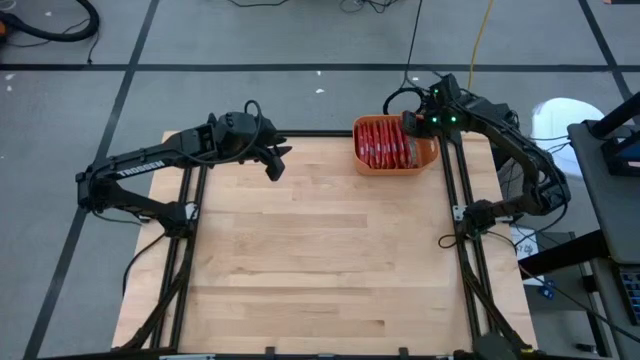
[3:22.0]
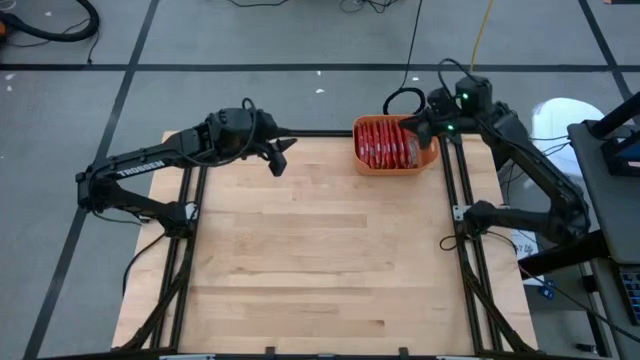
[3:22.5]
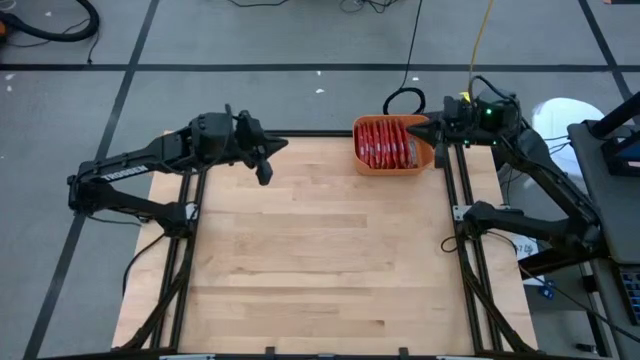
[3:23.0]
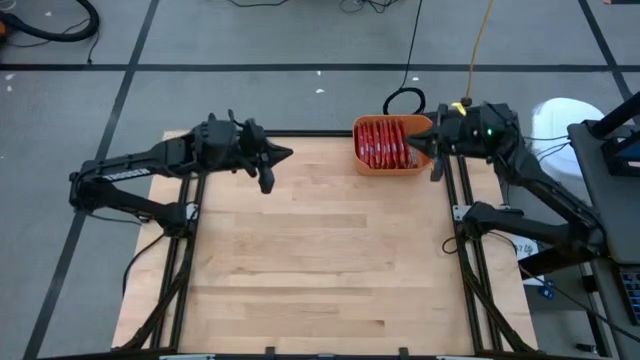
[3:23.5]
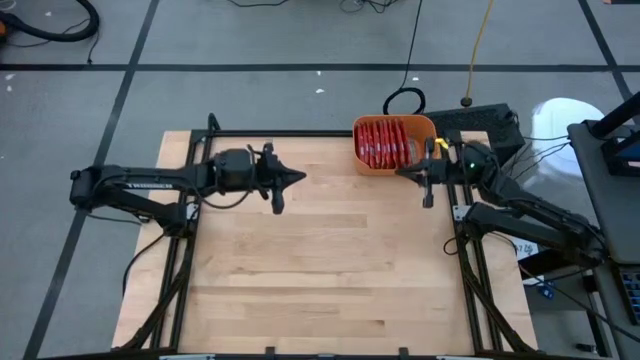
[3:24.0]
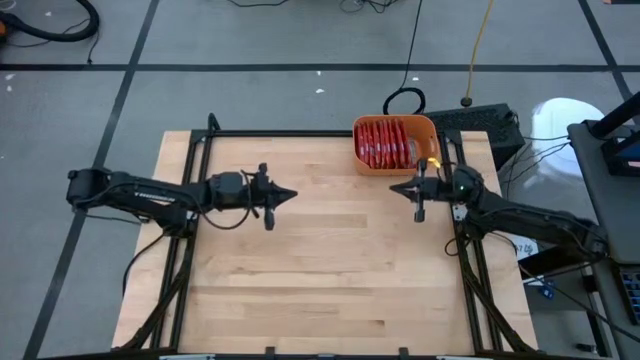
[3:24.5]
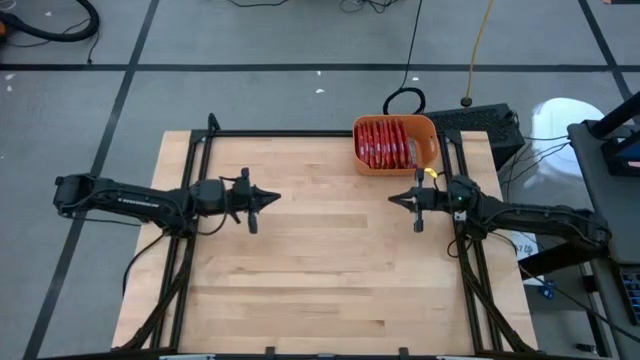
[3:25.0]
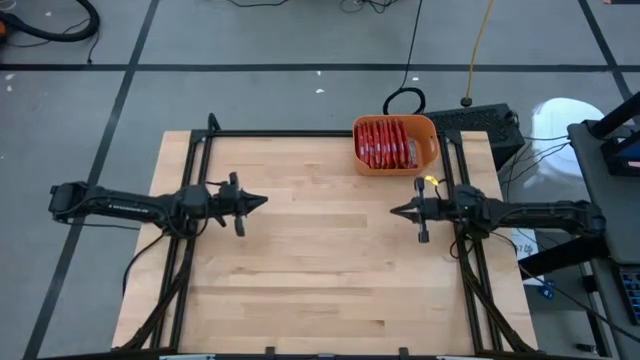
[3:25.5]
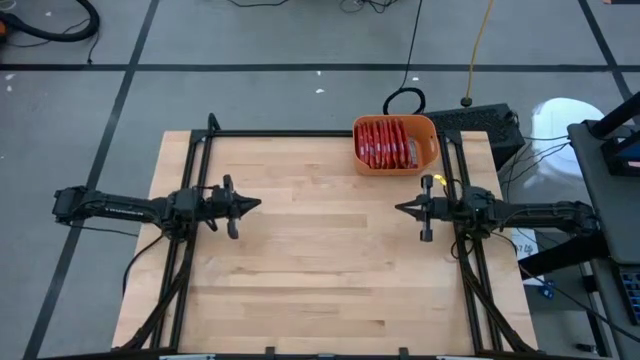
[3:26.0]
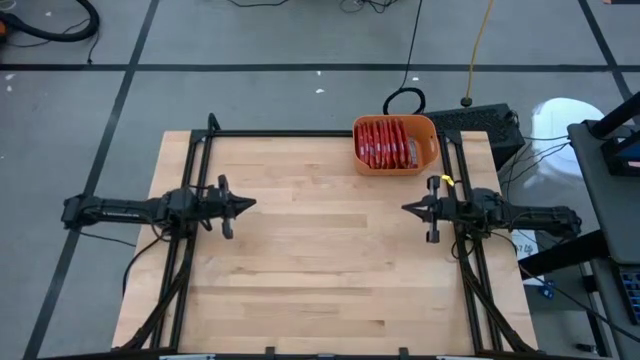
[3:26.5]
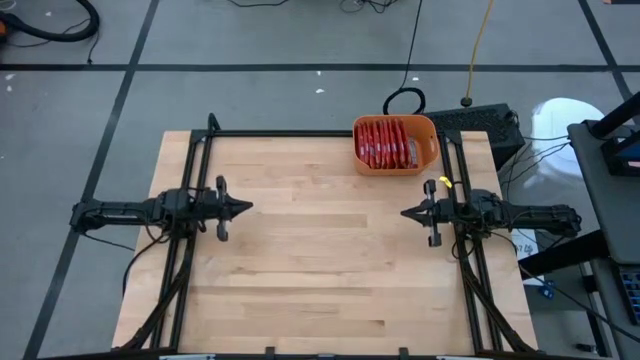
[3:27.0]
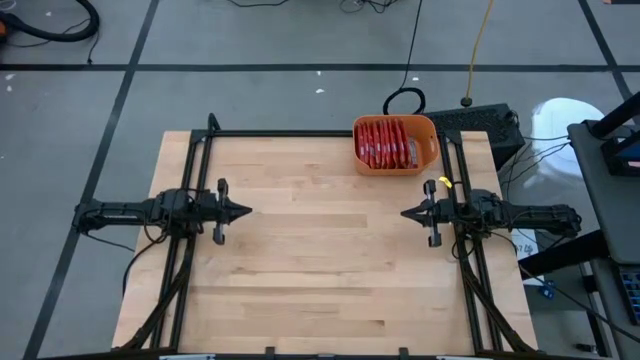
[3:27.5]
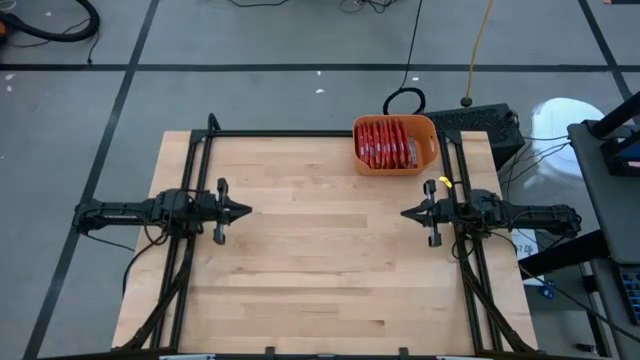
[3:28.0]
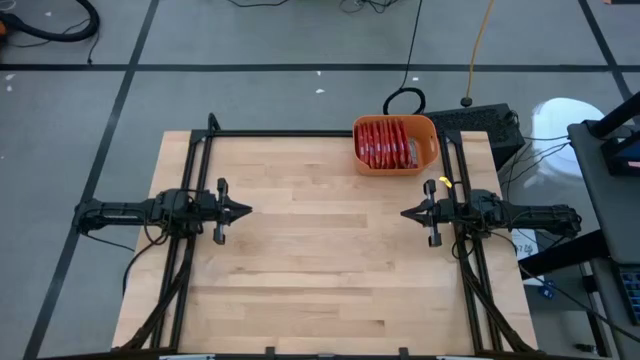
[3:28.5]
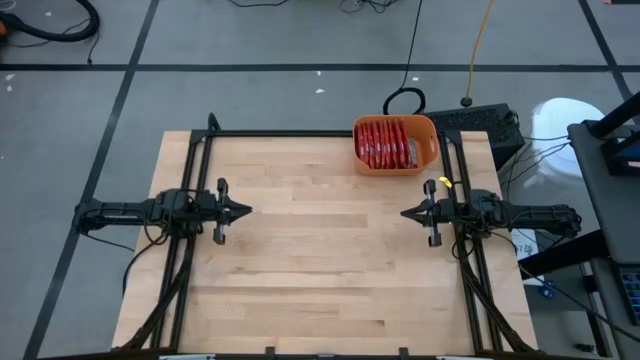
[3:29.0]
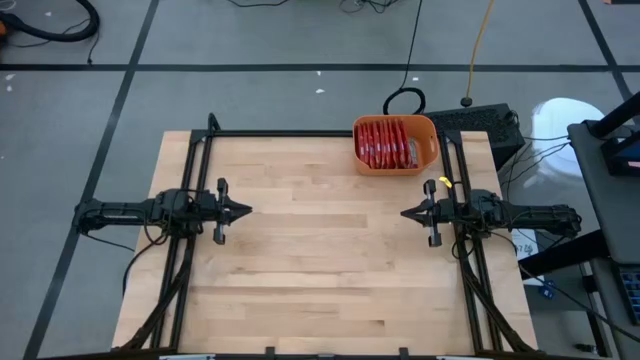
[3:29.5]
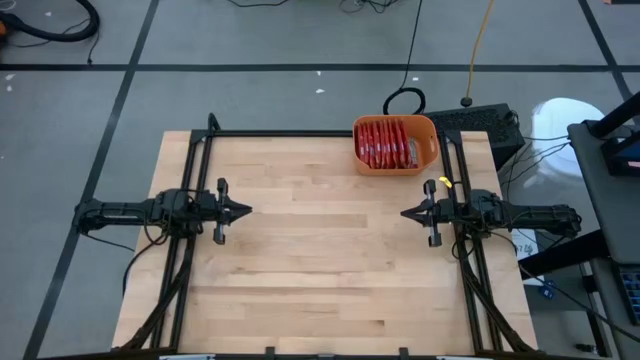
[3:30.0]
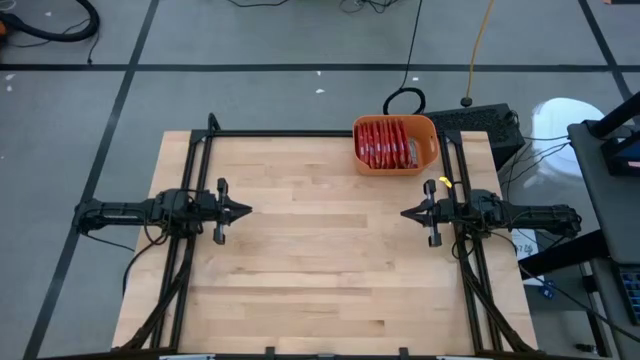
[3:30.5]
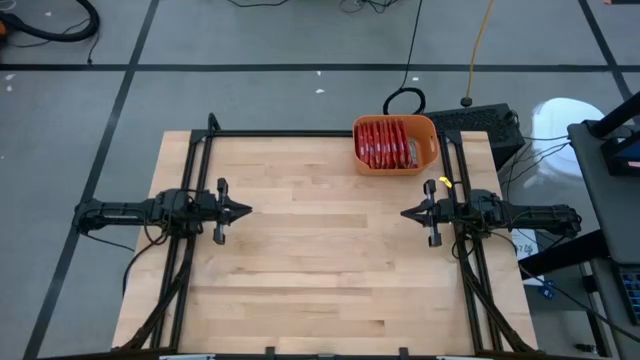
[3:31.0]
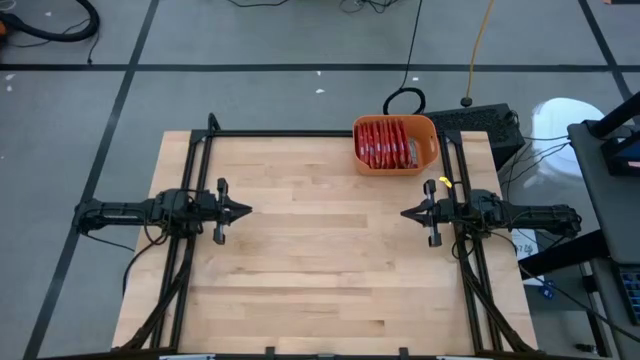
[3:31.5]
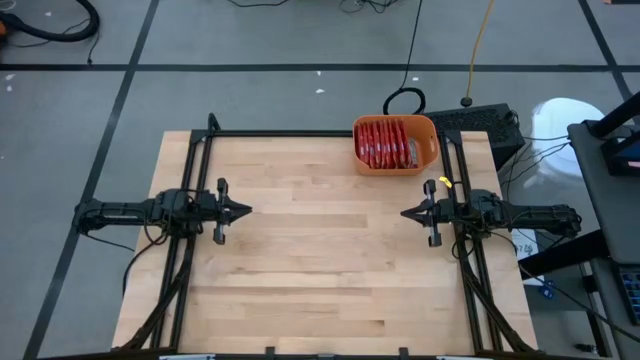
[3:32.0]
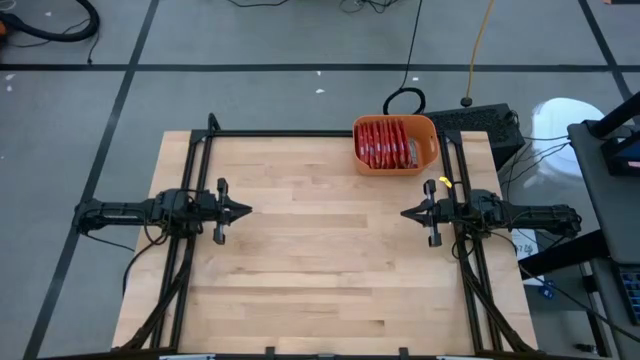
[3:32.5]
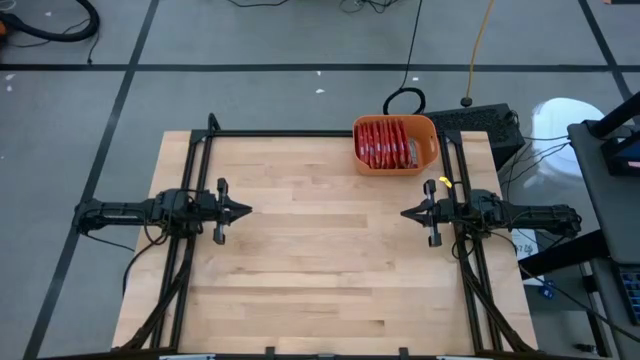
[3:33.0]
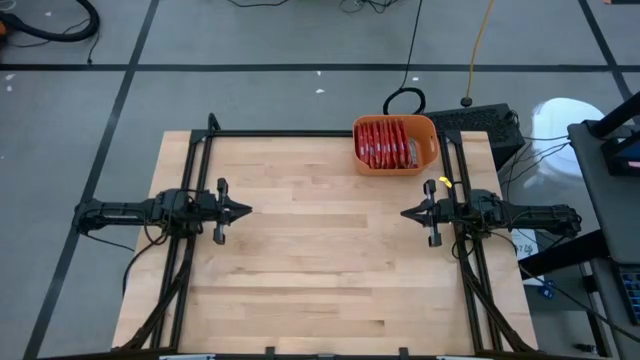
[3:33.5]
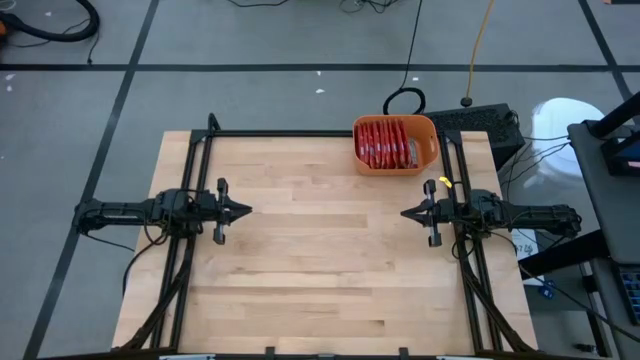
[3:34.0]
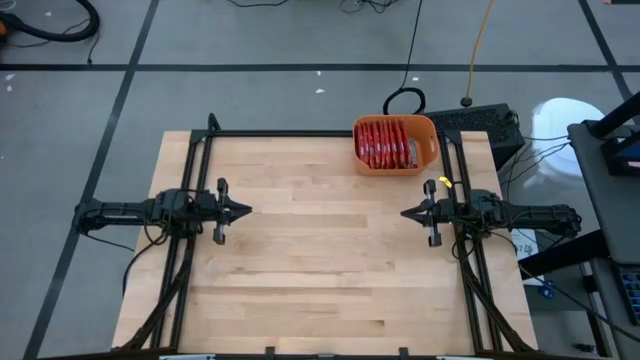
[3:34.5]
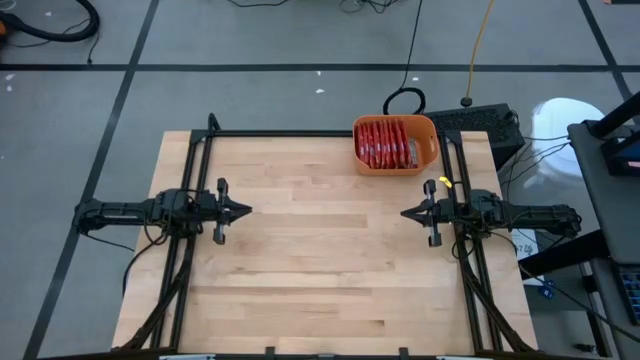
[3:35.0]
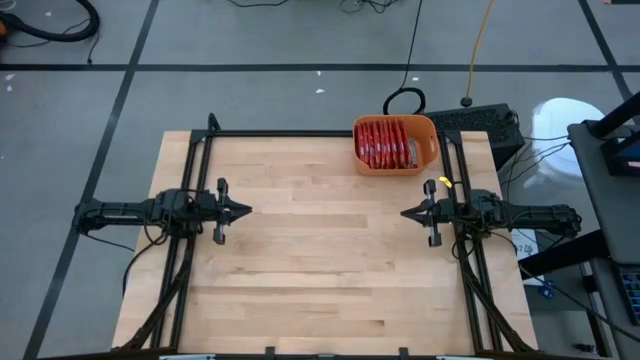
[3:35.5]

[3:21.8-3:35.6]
Task: Sort popcorn bags into baskets
Return to Home Position

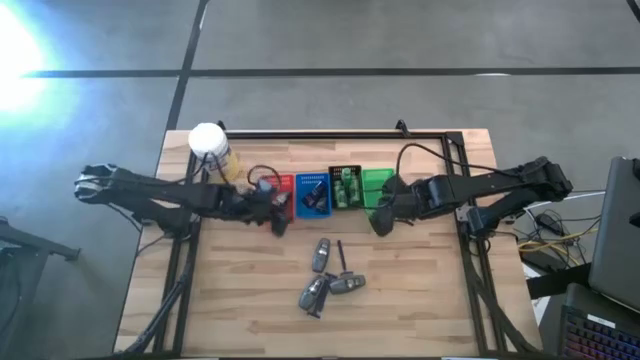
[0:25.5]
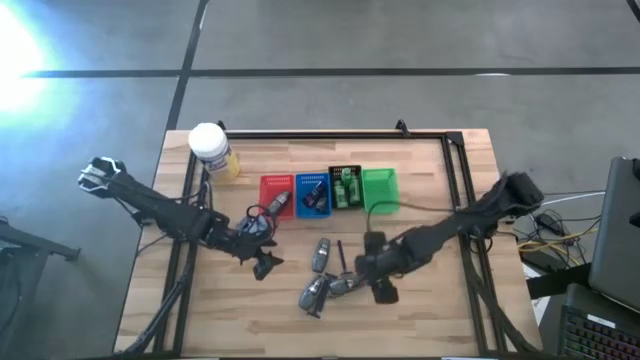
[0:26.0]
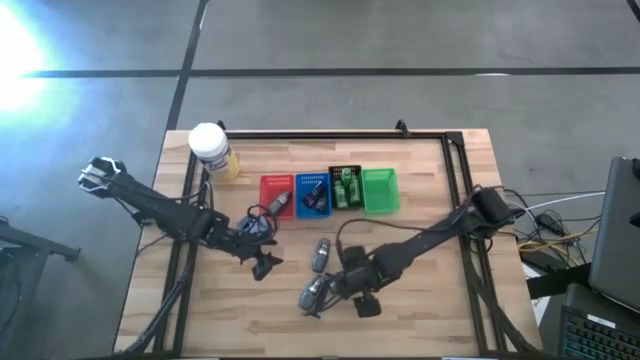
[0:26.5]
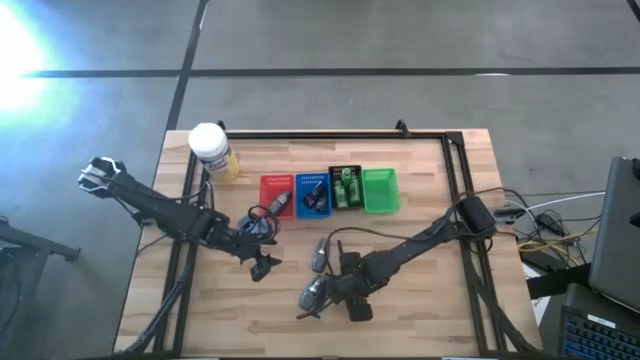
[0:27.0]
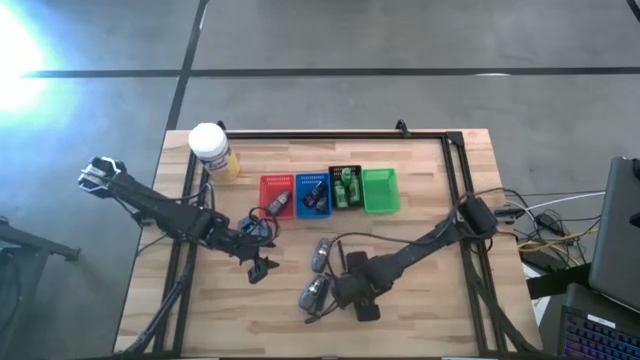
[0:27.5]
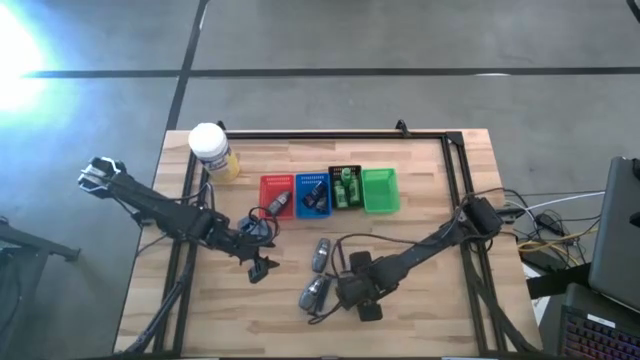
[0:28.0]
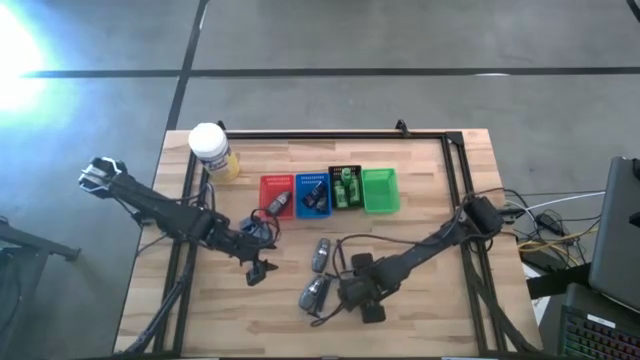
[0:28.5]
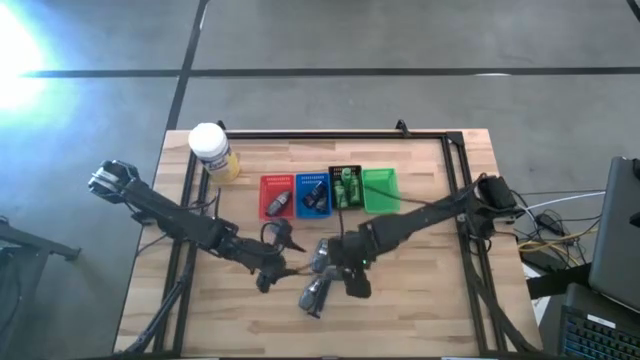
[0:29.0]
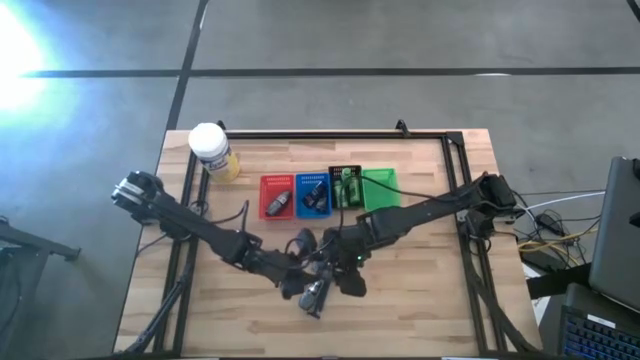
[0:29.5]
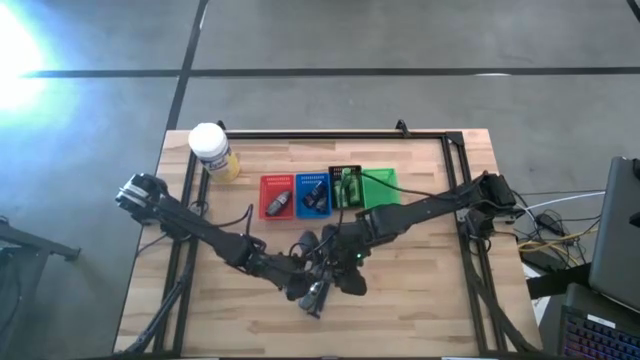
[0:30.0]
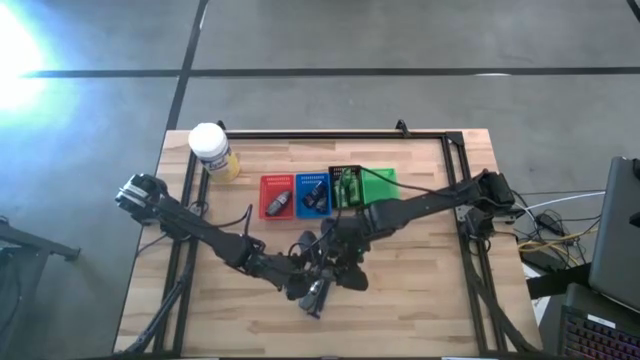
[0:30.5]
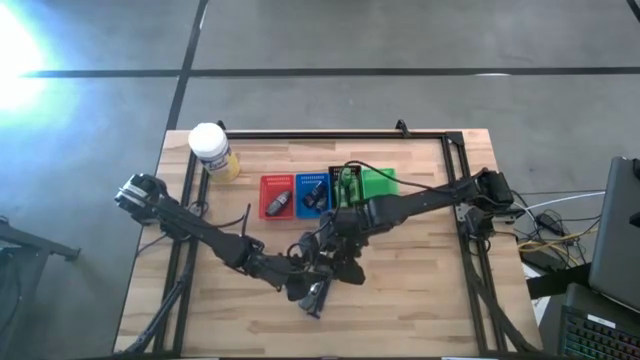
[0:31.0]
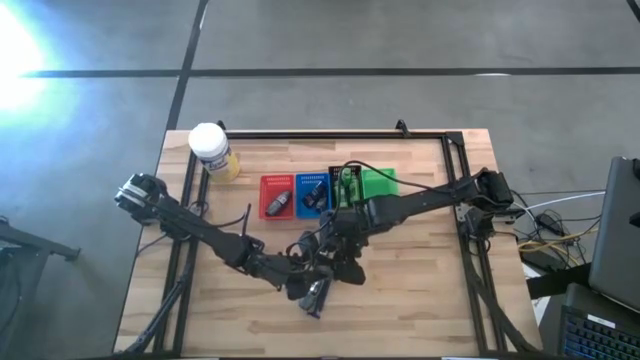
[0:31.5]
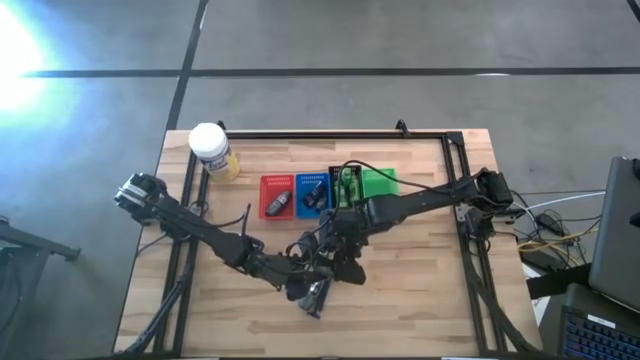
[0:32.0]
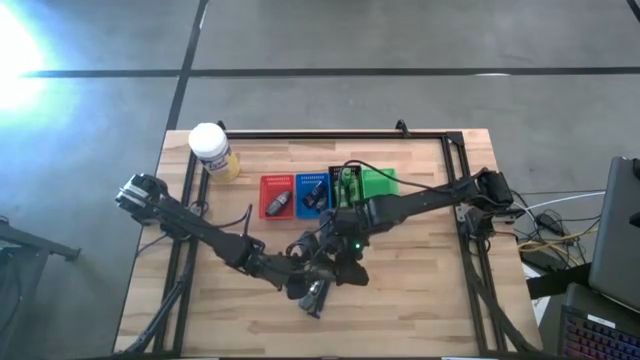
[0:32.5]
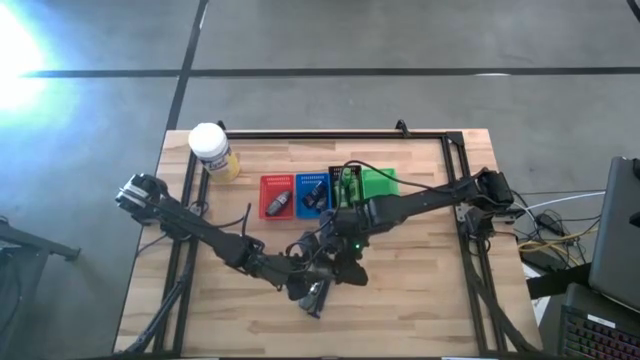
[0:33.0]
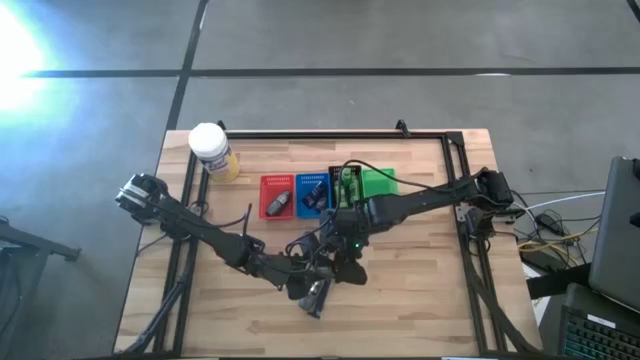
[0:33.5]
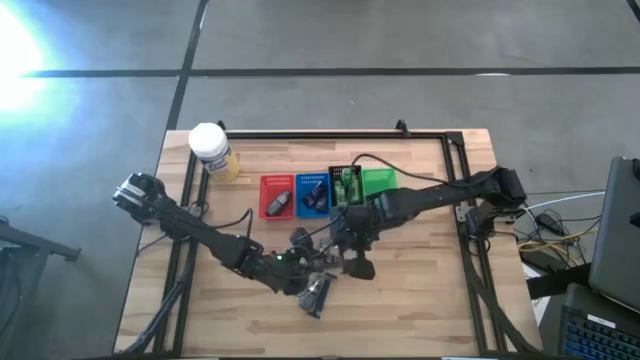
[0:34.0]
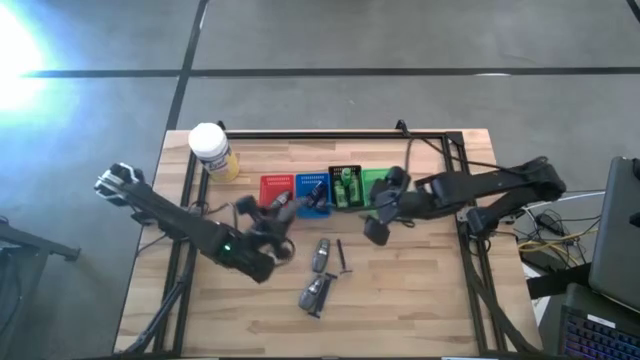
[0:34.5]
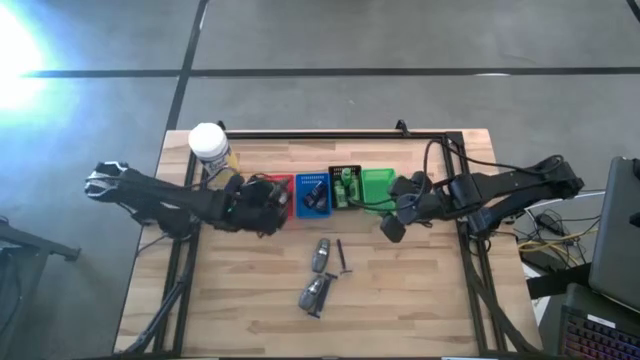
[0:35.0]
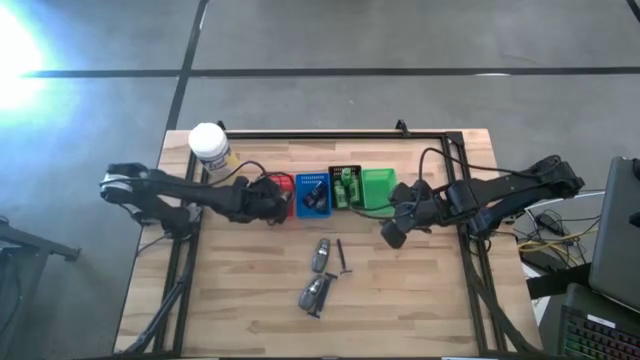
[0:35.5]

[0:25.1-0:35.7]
Task: Pick & Place Travel size toiletries
Put the gray deodorant into the red bin
